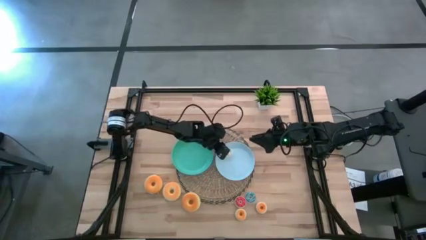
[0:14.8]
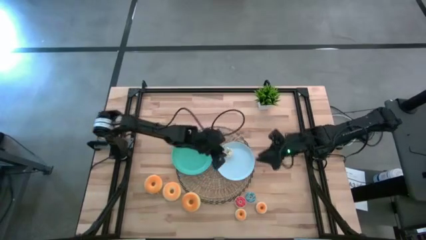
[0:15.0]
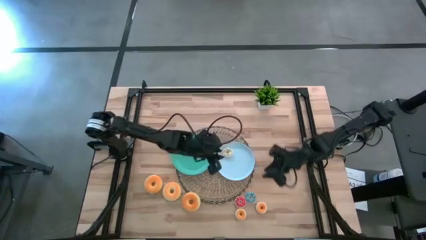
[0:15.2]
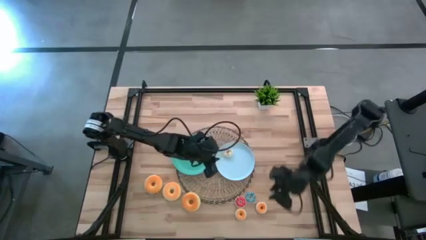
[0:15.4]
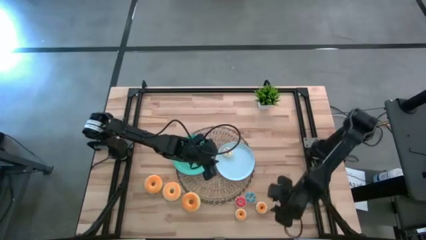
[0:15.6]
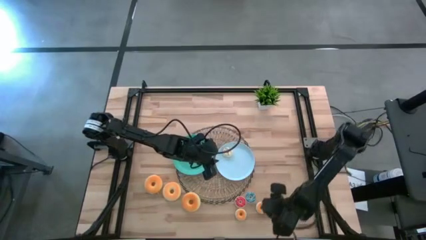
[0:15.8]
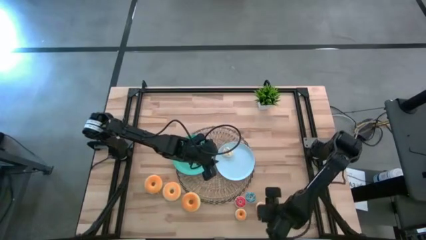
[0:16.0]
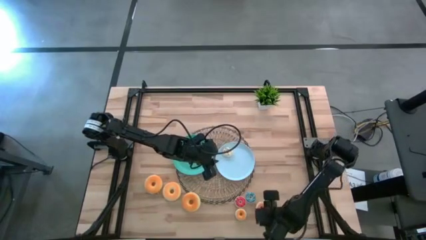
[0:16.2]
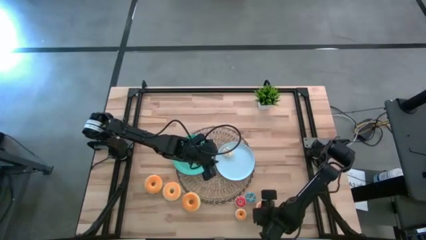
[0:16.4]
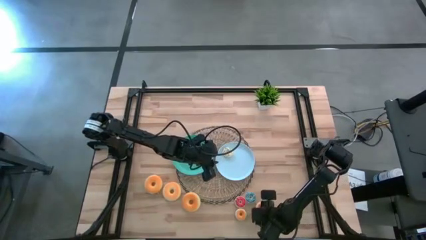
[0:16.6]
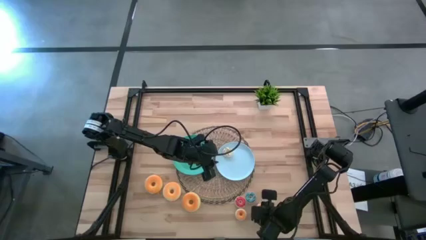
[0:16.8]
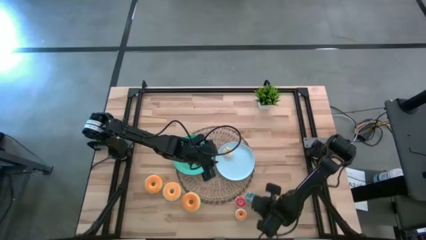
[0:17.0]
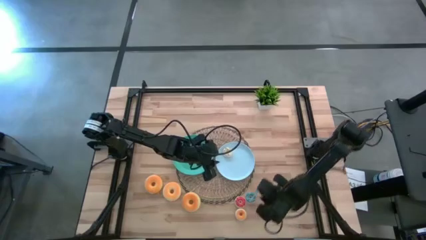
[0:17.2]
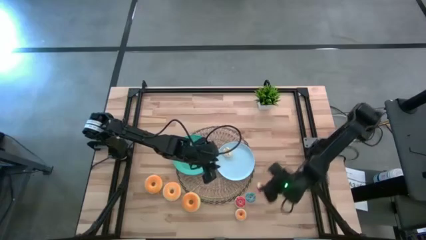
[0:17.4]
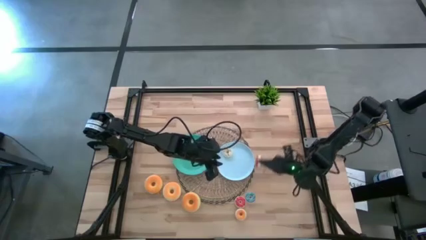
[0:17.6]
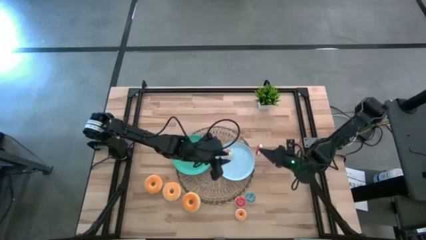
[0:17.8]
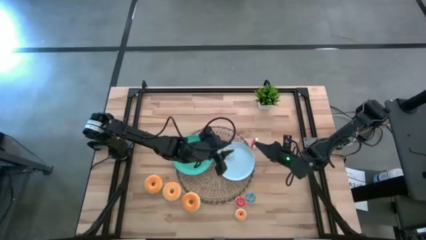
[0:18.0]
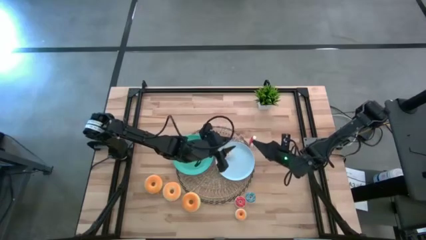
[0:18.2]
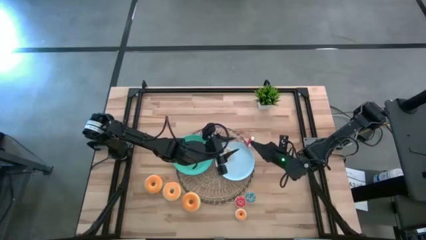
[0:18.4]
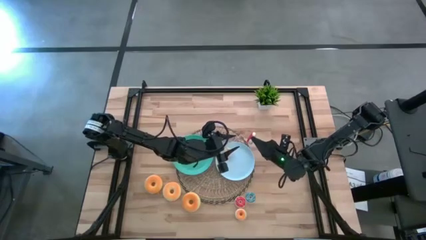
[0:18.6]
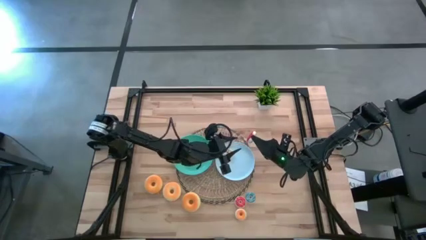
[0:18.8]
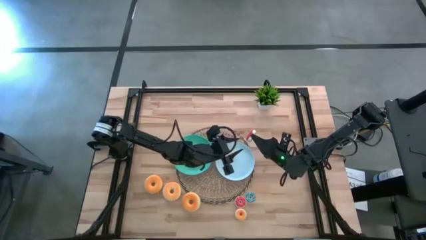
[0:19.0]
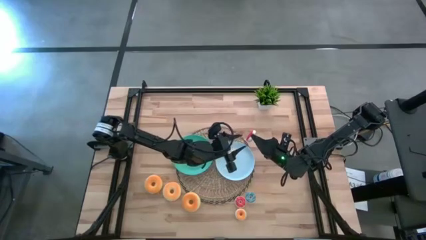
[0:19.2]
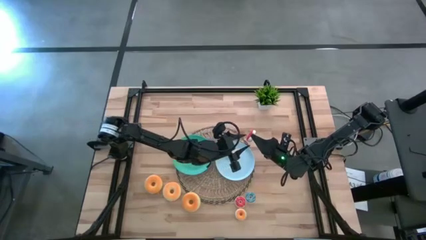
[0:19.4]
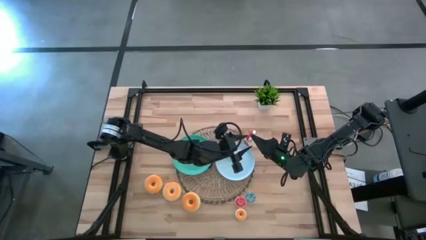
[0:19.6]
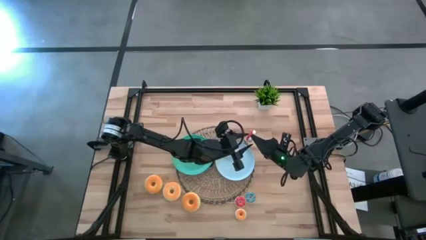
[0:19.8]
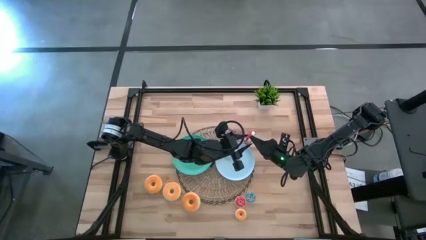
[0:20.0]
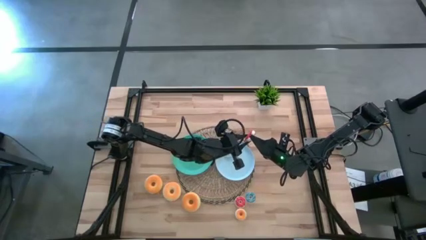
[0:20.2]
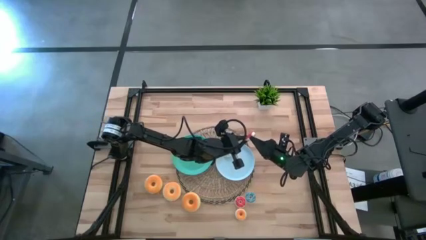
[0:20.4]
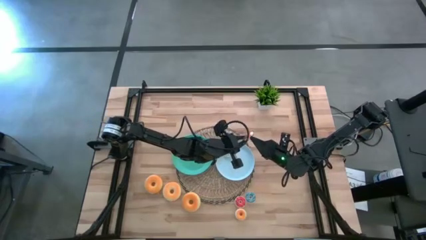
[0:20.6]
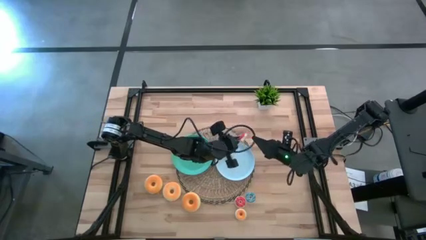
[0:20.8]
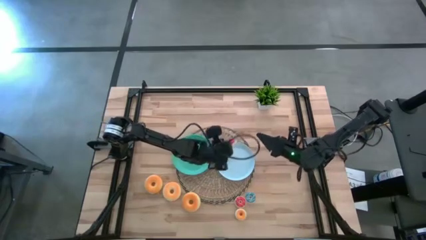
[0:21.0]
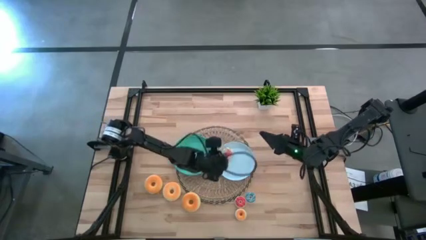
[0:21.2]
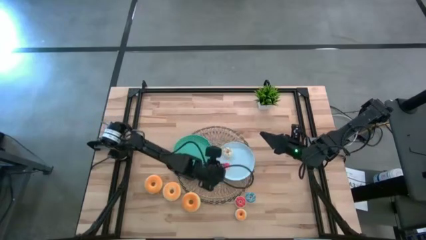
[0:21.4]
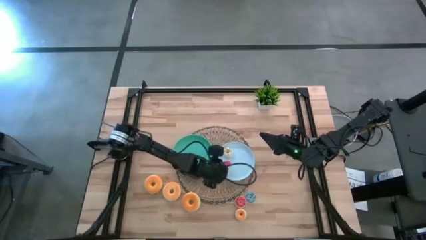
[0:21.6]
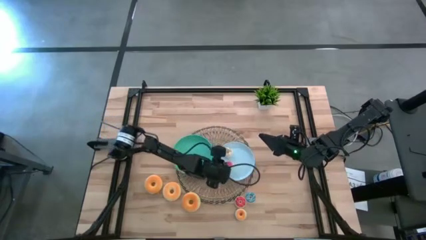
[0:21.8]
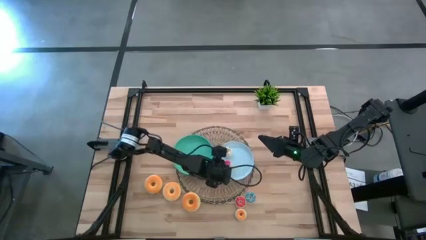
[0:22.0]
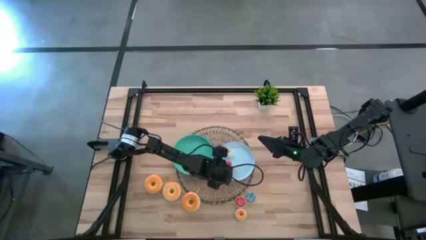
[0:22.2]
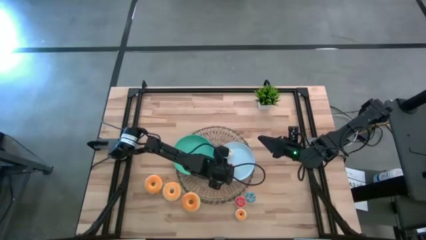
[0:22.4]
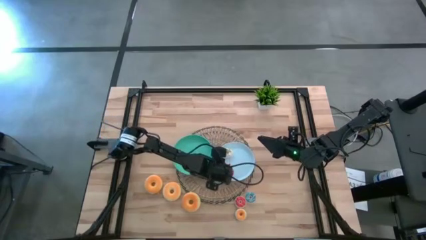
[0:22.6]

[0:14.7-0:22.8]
Task: Pick & Place donuts
Put the small red donut on the light blue plate

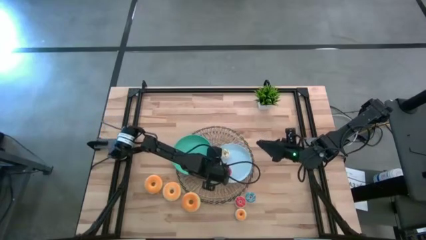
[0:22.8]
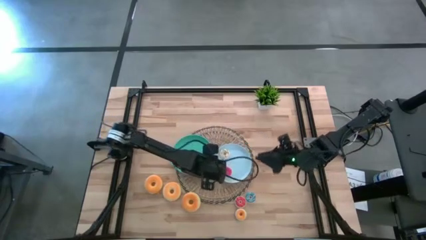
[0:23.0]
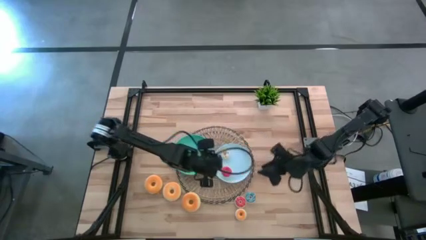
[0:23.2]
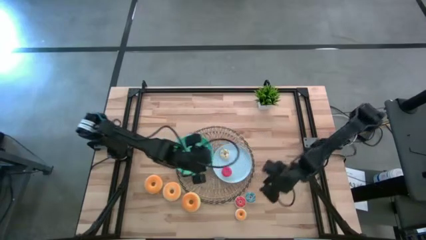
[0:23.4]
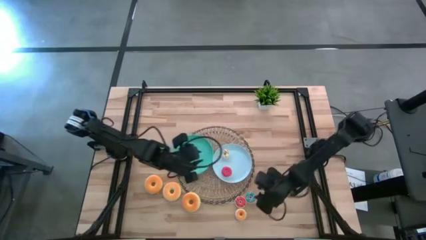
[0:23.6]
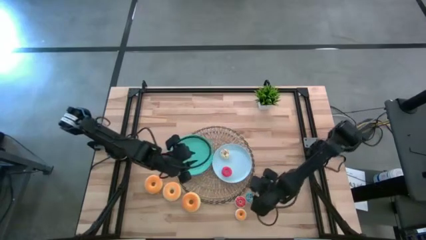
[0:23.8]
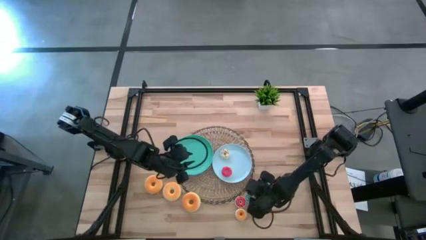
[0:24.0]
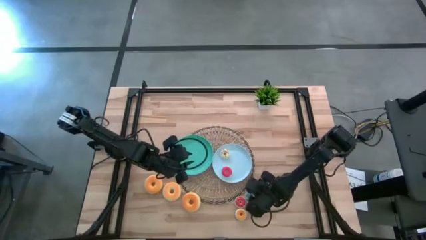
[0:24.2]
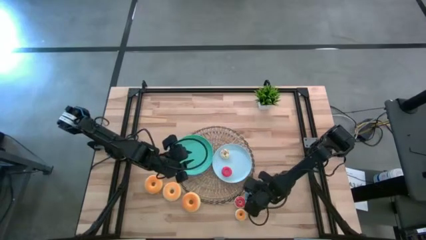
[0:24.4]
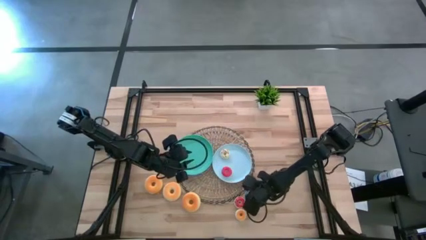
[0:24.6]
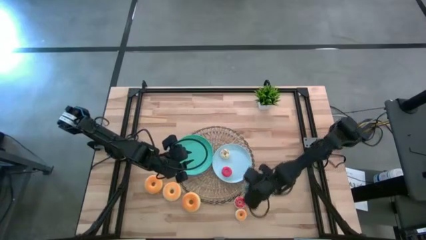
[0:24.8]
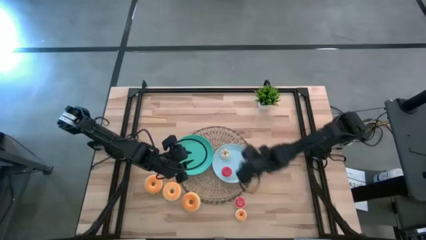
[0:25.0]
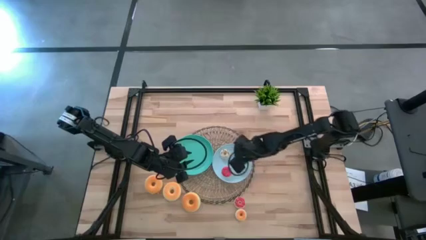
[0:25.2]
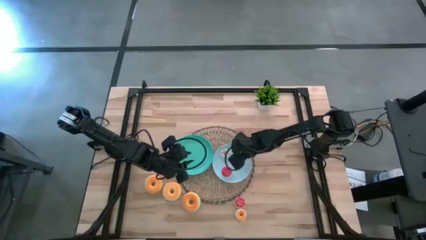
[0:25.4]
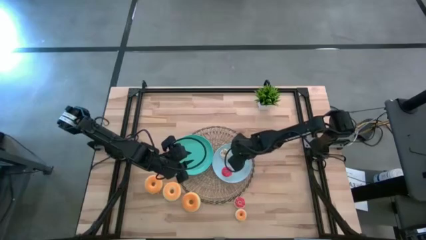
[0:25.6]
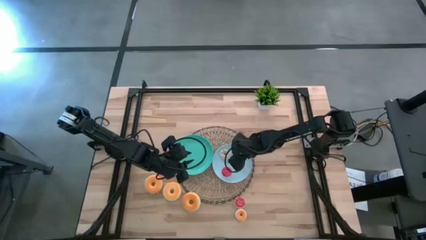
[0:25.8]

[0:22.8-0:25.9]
Put the small blue donut on the light blue plate

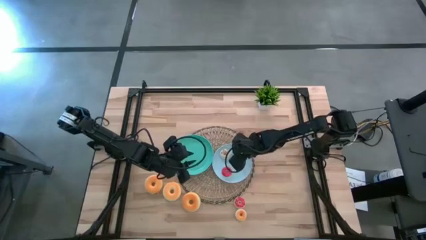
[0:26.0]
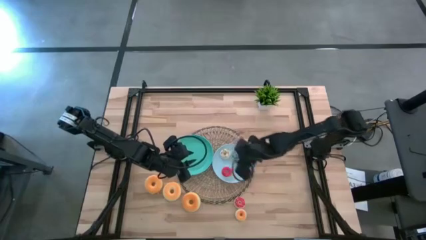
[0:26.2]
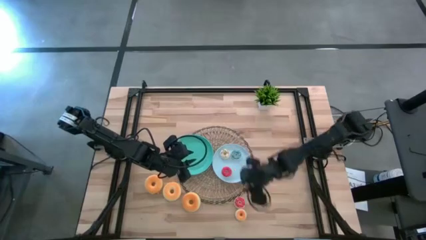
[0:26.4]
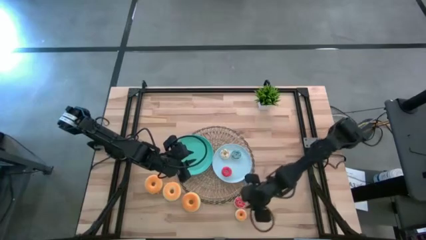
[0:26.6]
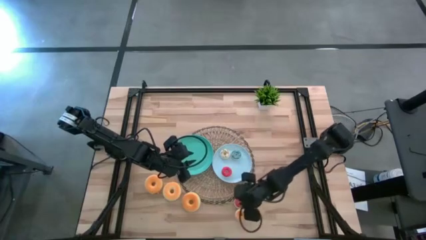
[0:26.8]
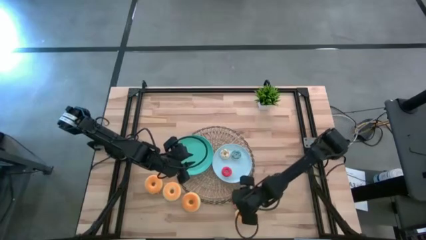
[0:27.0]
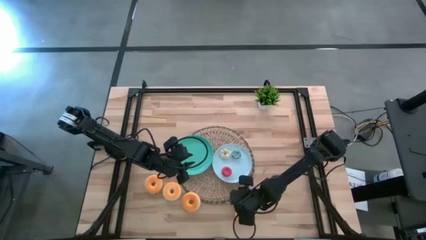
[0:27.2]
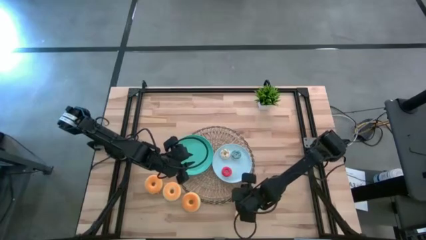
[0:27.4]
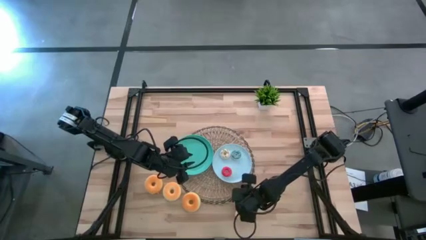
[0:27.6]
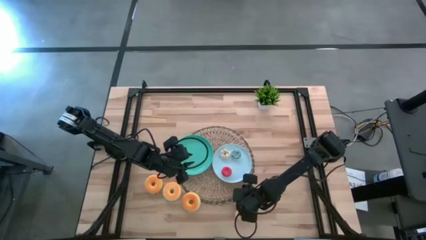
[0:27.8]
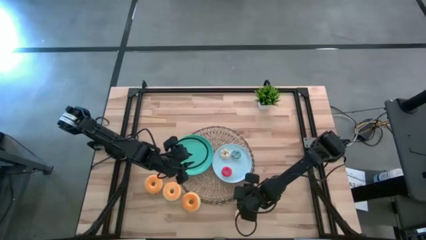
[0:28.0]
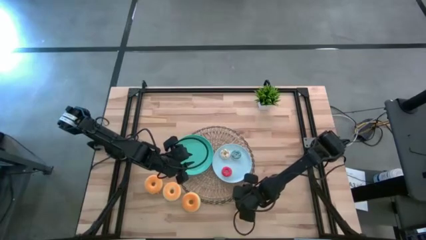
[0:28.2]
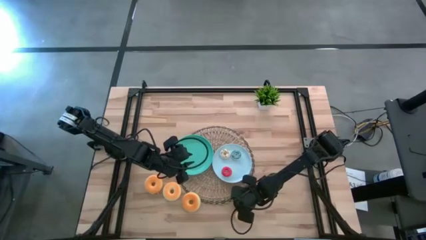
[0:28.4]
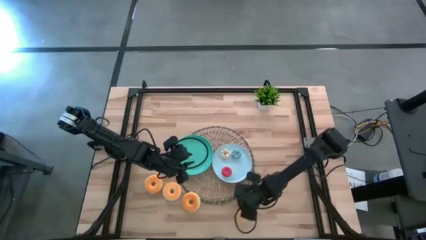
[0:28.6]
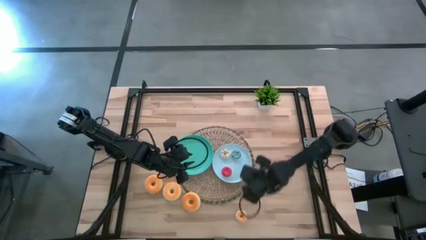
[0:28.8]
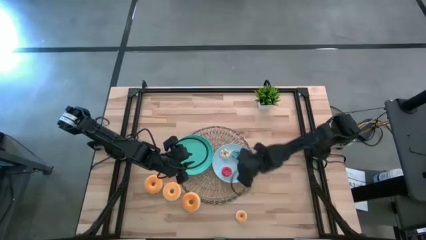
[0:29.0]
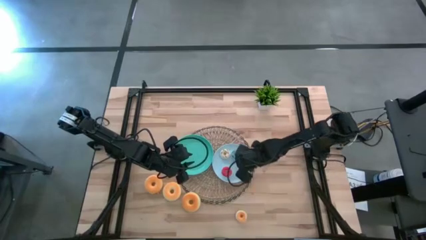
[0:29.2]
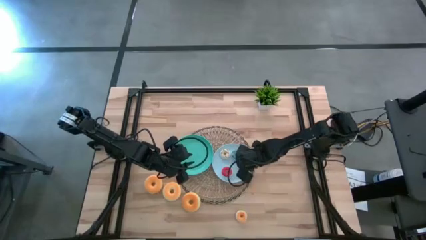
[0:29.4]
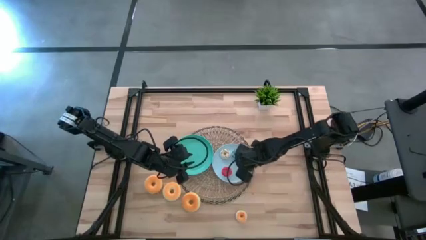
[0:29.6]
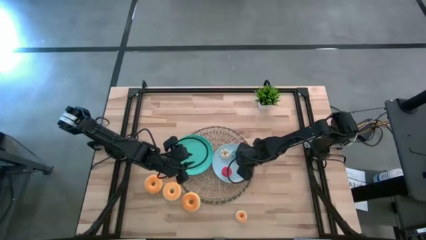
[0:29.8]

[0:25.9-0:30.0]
Put the small orange donut on the light blue plate

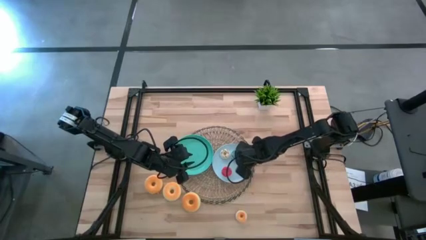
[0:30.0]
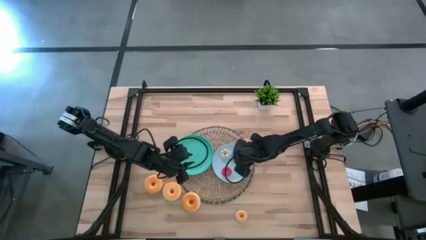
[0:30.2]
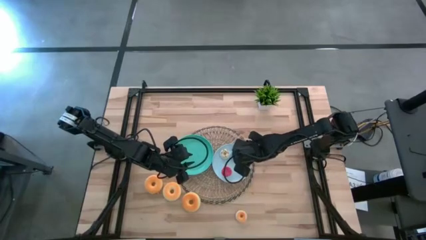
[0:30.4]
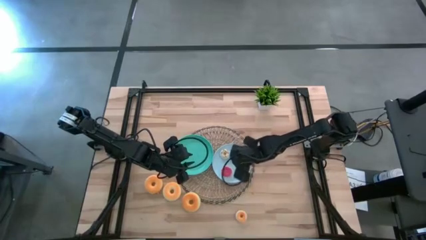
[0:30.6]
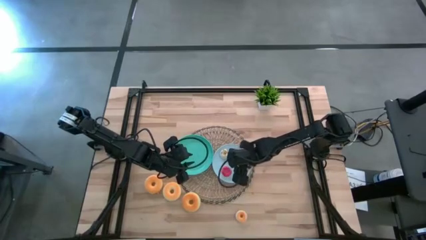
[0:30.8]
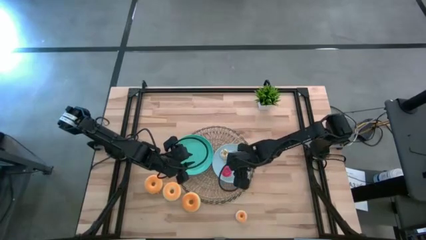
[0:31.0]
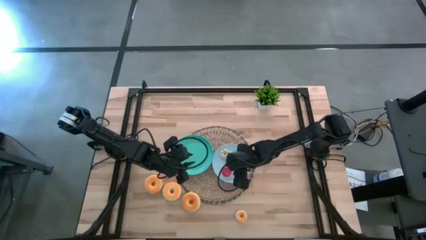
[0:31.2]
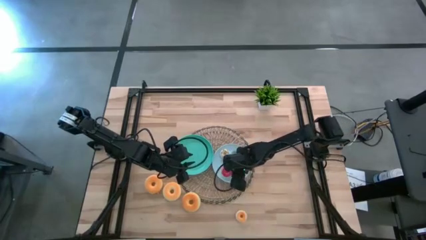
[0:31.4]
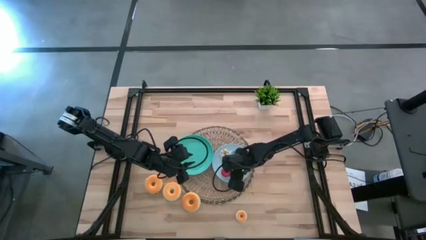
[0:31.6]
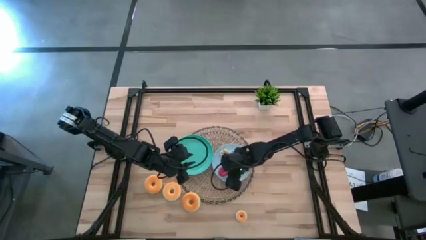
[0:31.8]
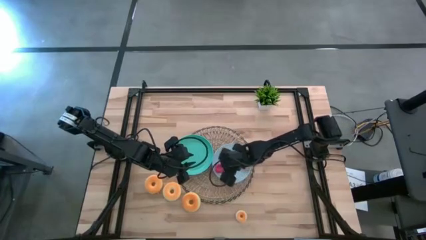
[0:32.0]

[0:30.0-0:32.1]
Adjust the small red donut on the light blue plate
